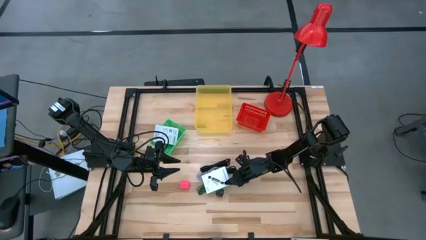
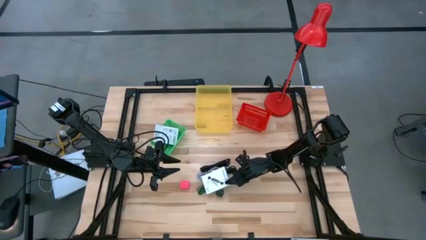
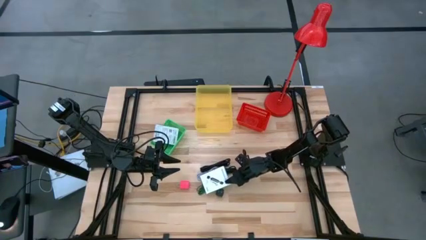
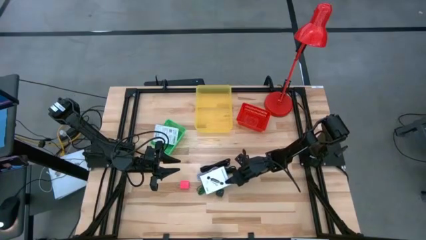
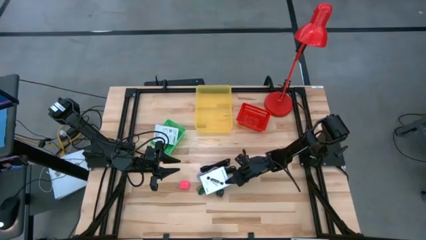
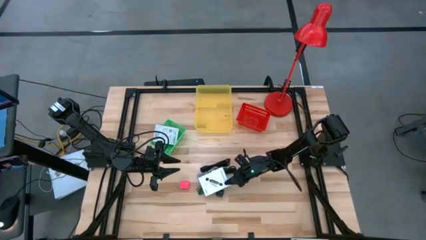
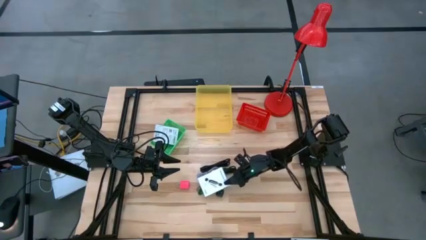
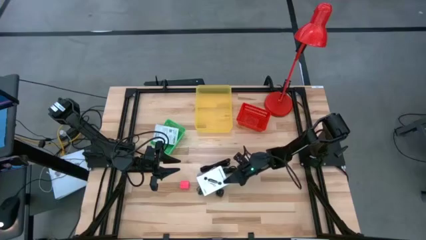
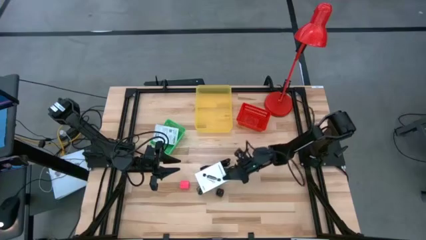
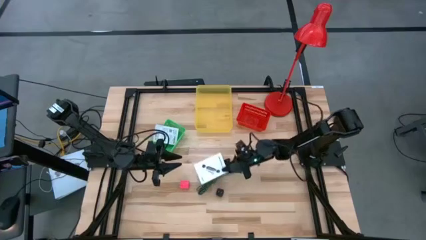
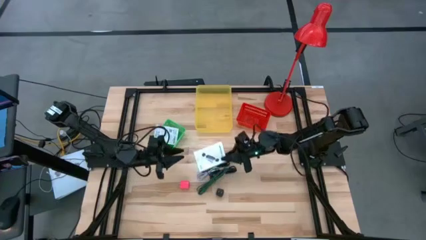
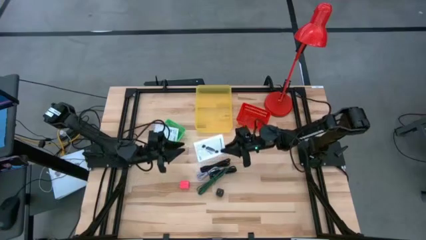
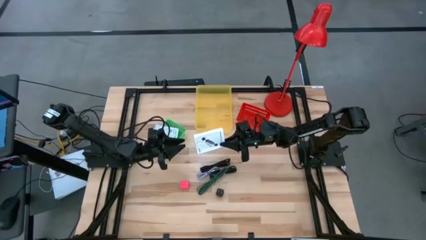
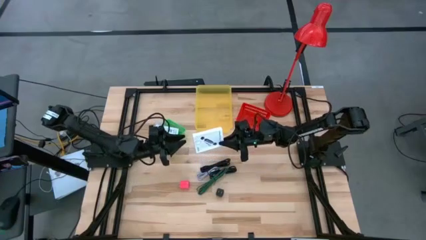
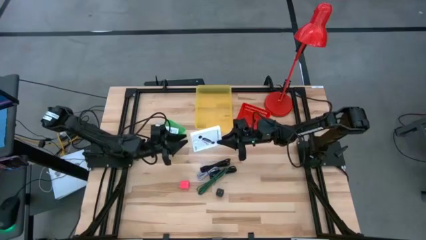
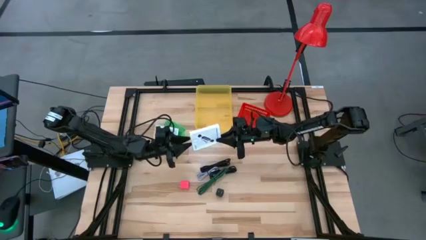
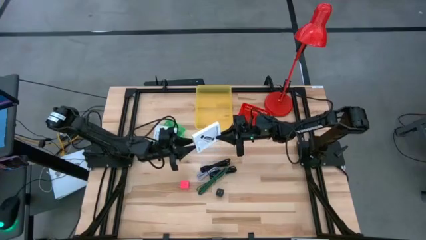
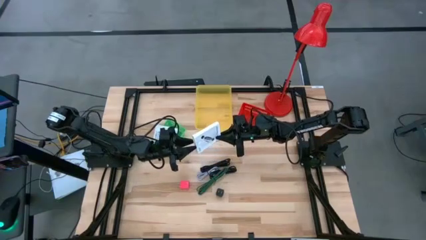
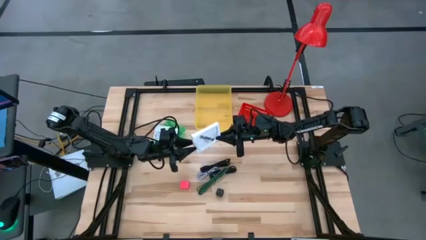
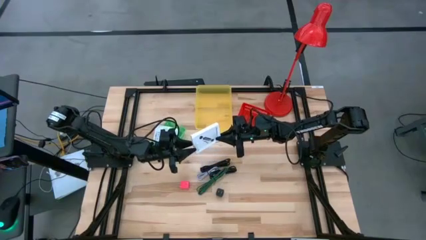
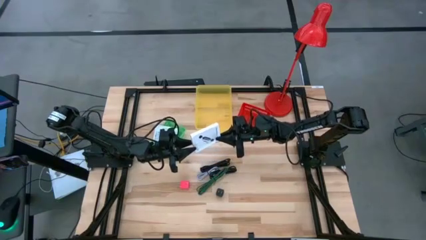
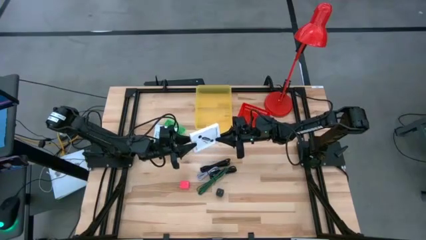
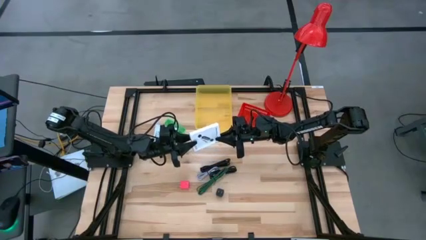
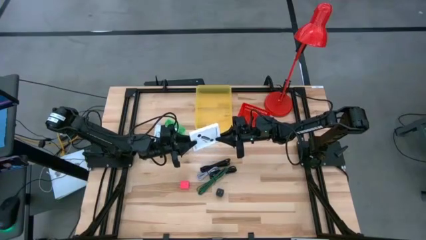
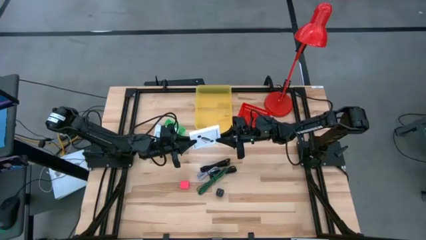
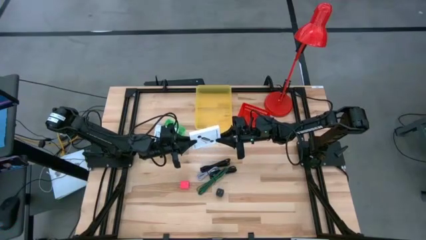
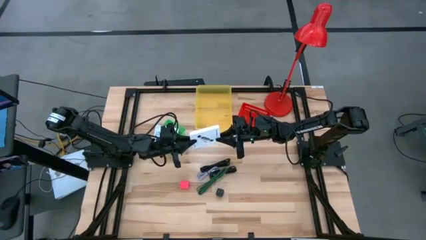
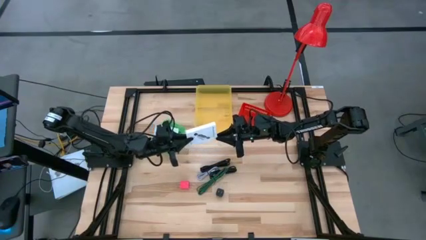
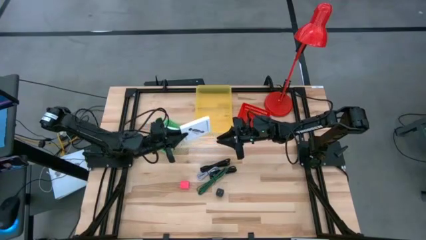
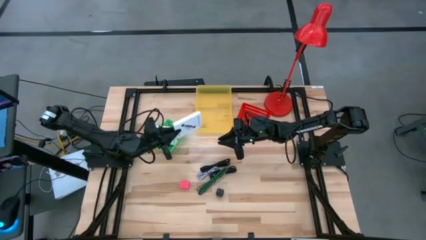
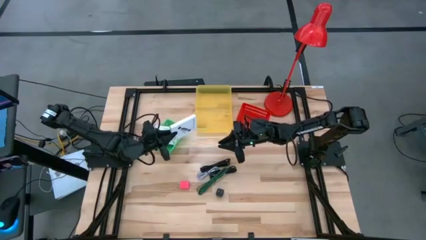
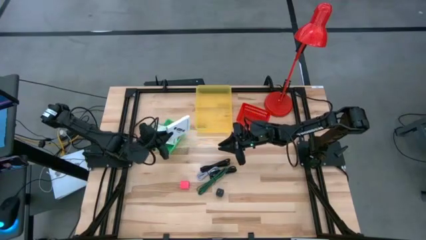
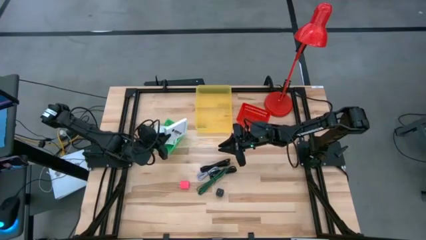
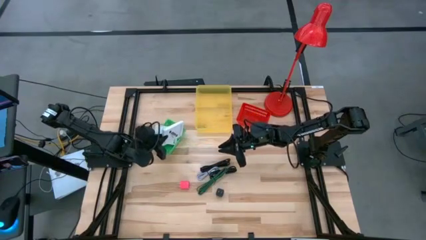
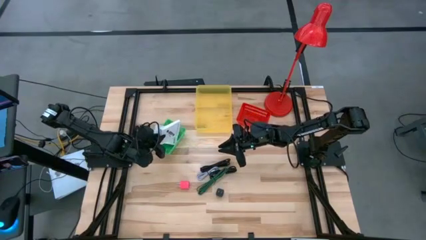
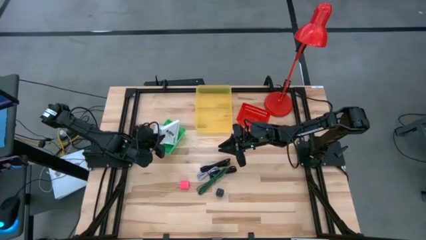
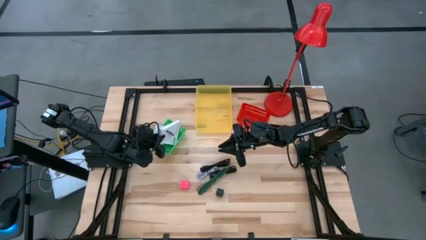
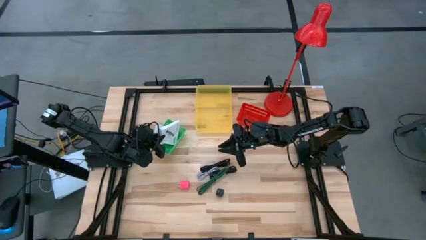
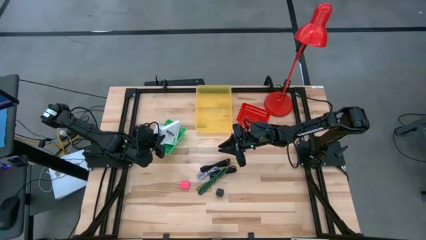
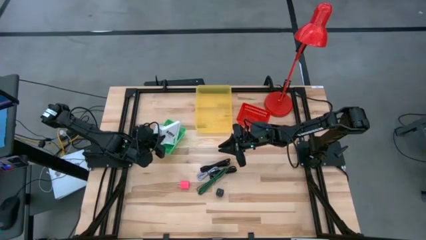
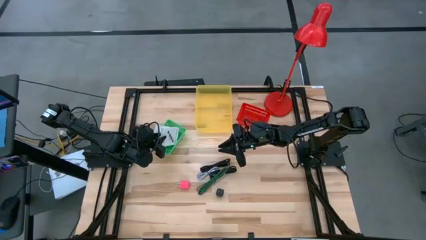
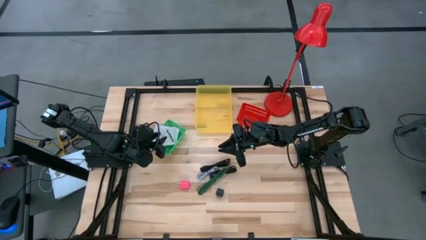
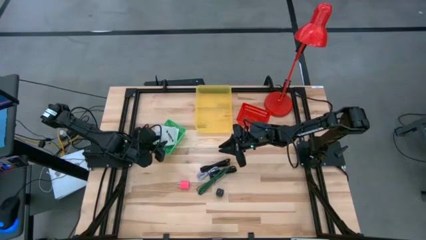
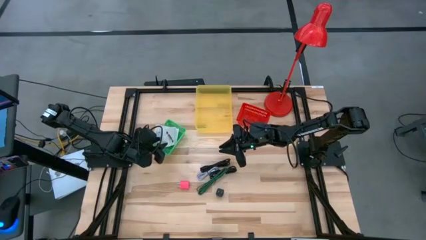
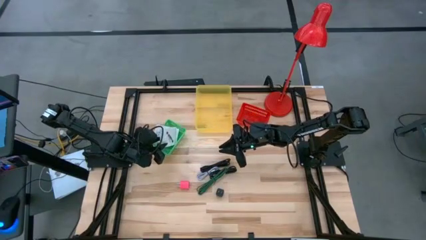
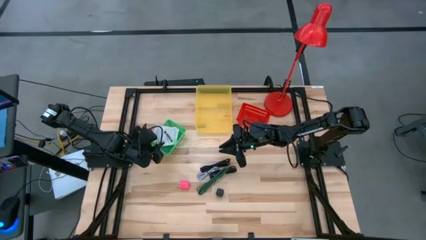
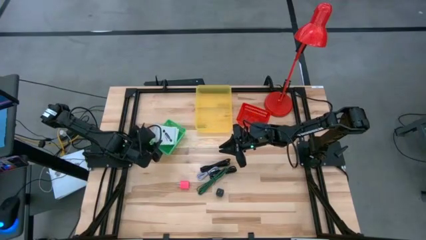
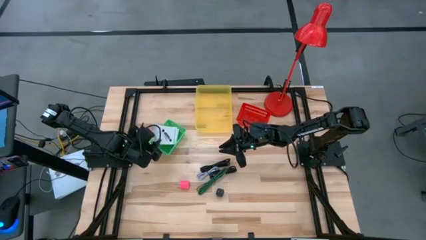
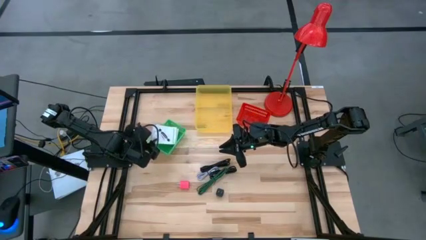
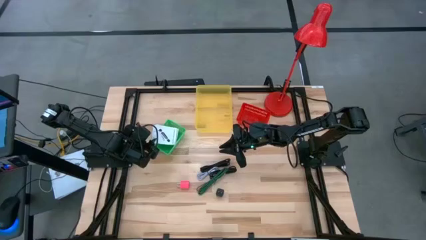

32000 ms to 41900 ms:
Task: Pick and place items into bin
Put the white box into the green basket

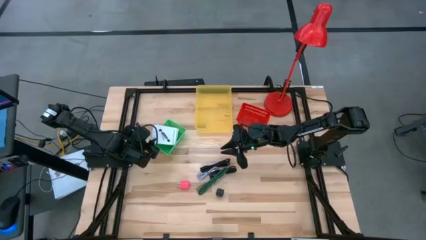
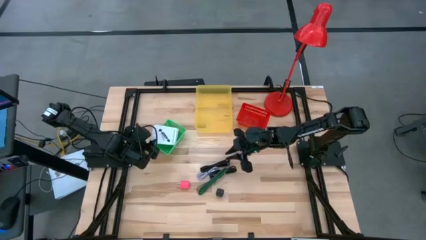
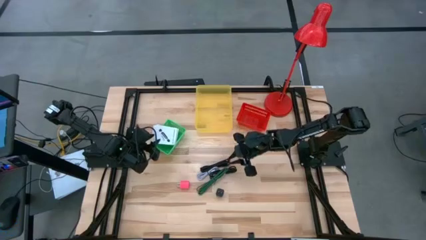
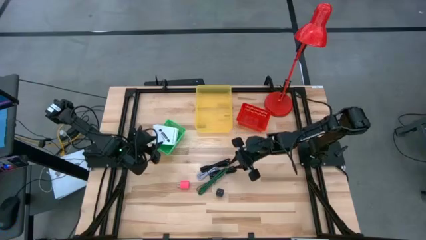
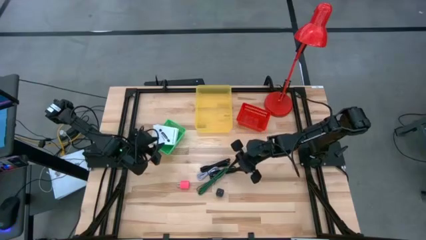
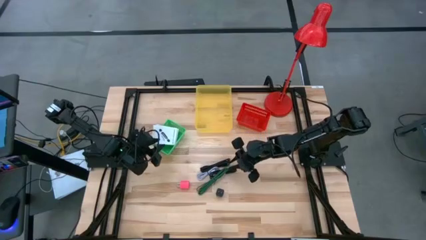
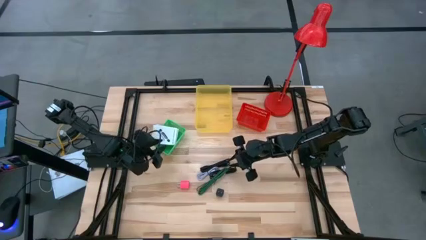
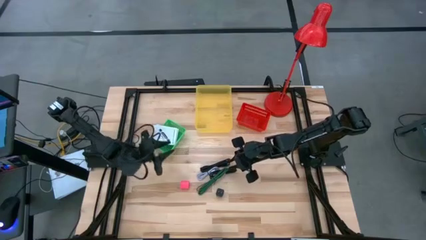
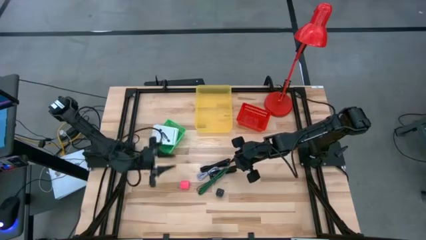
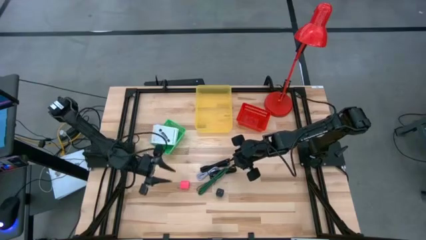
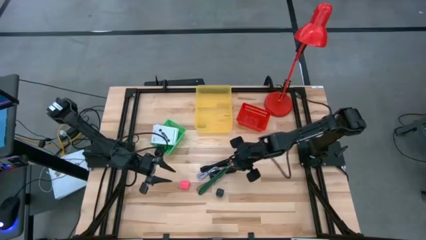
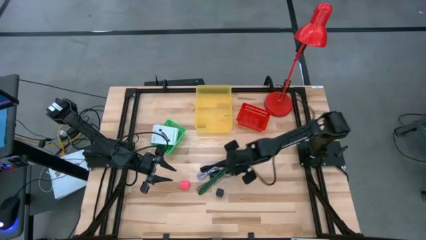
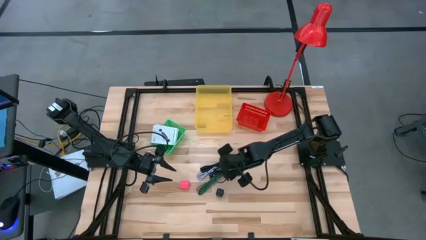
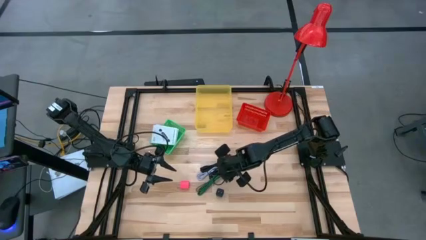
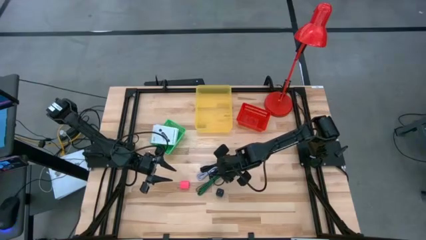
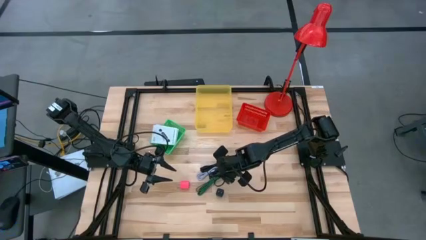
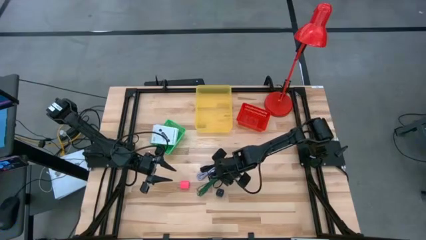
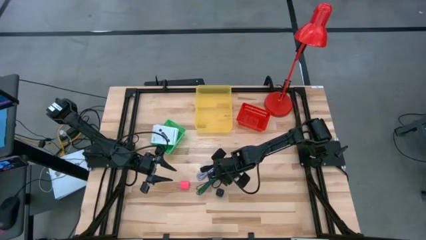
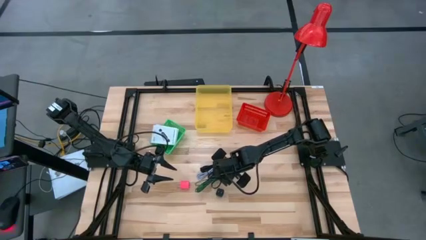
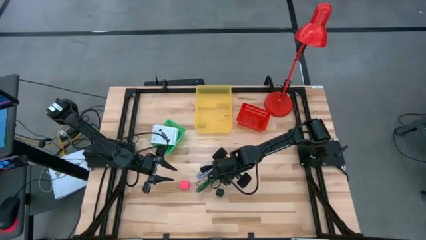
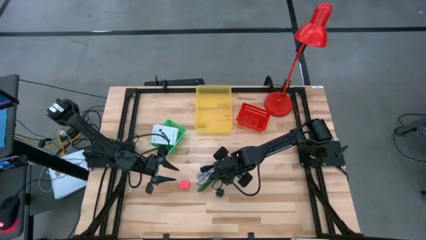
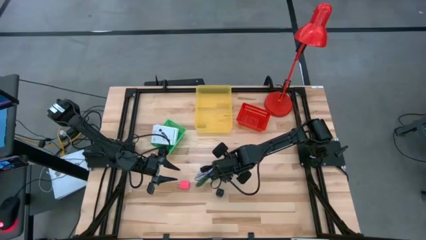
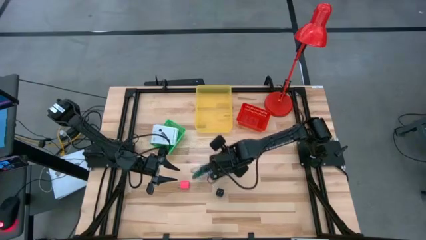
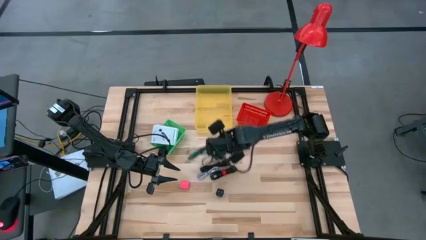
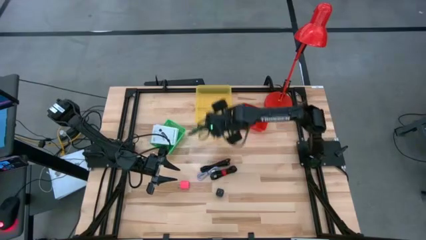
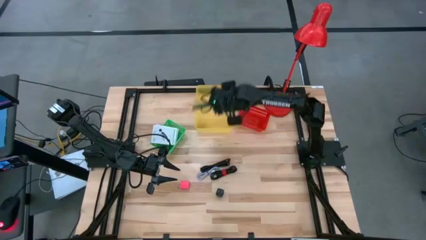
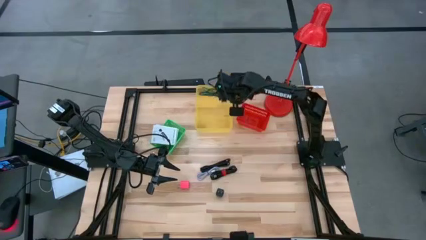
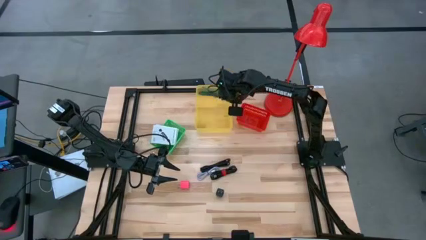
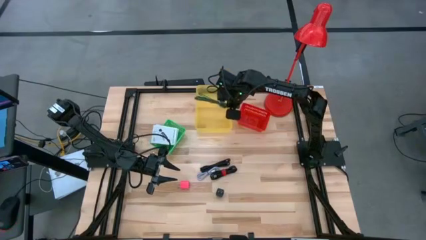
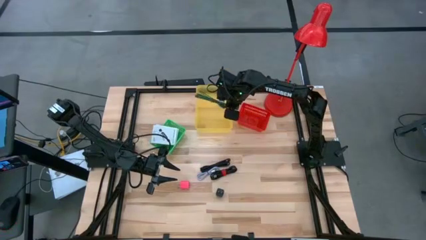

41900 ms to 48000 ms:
Put the green charger cable into the yellow bin
